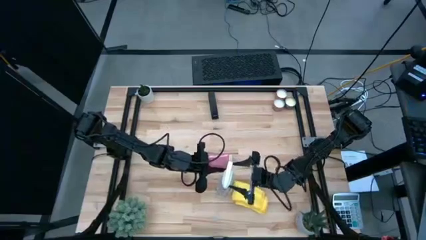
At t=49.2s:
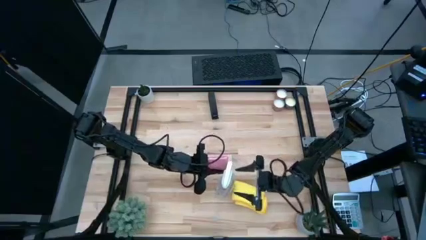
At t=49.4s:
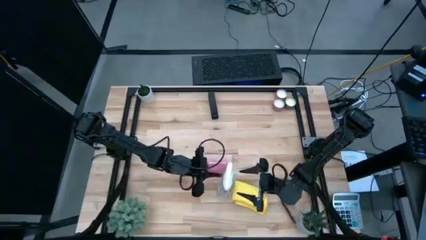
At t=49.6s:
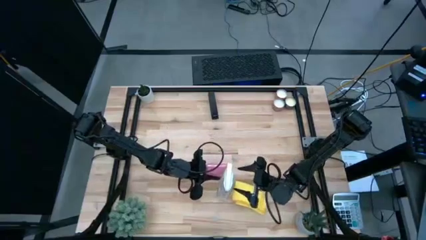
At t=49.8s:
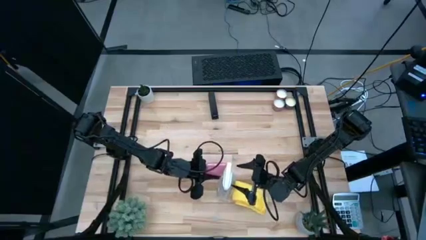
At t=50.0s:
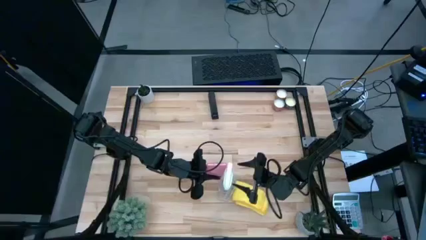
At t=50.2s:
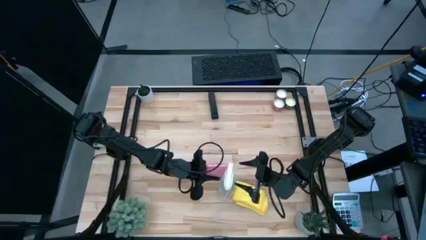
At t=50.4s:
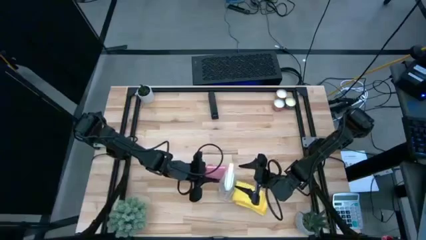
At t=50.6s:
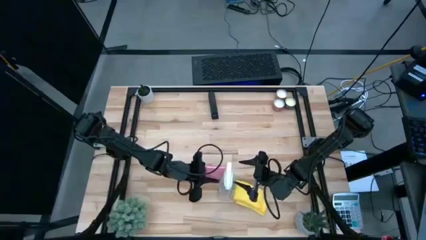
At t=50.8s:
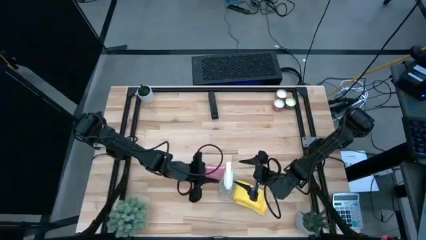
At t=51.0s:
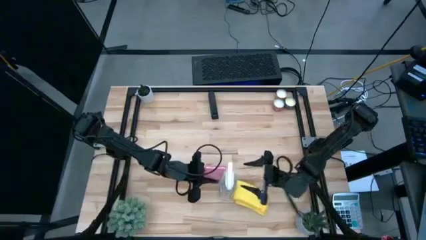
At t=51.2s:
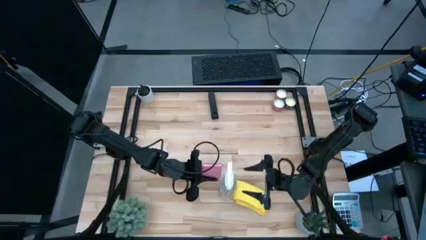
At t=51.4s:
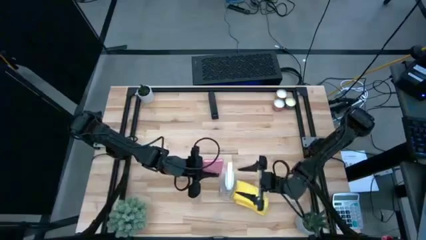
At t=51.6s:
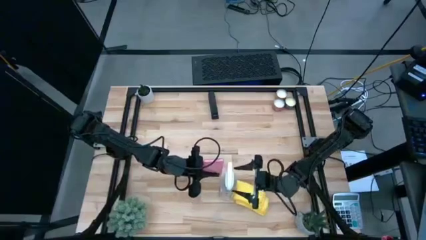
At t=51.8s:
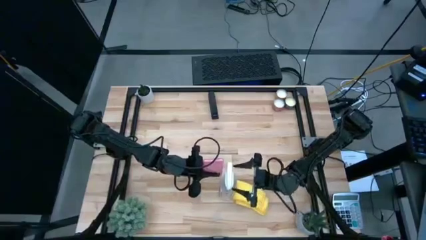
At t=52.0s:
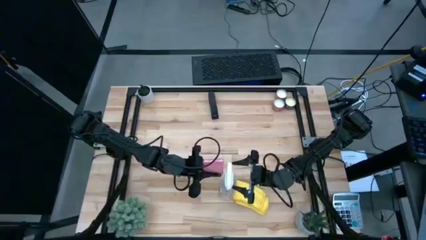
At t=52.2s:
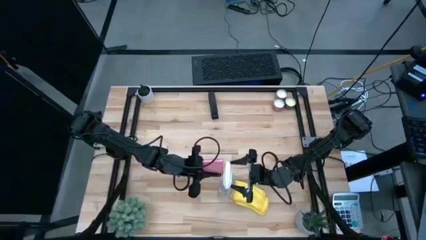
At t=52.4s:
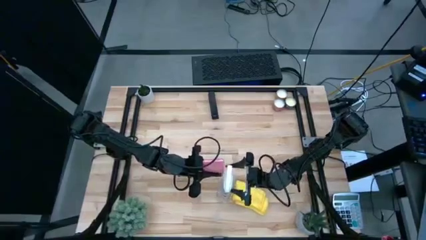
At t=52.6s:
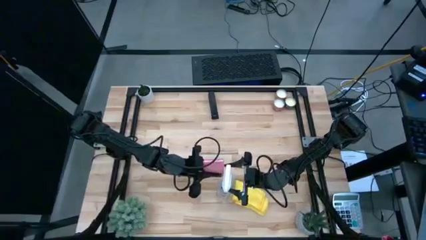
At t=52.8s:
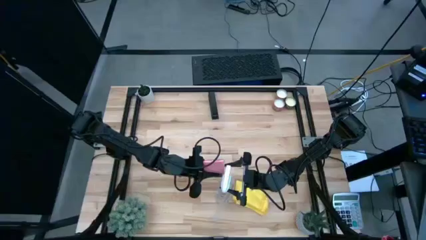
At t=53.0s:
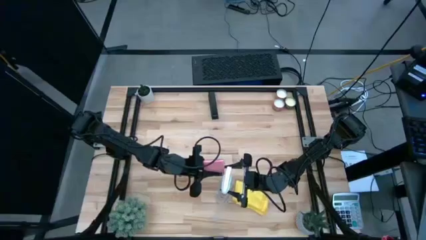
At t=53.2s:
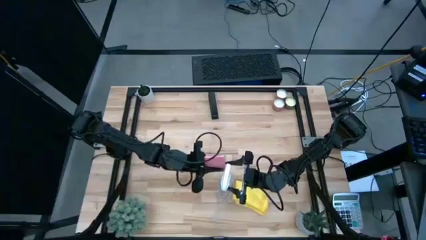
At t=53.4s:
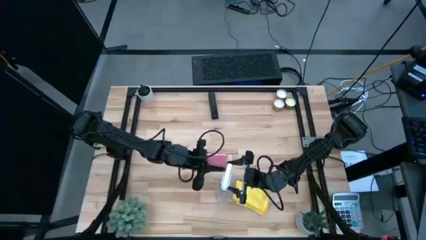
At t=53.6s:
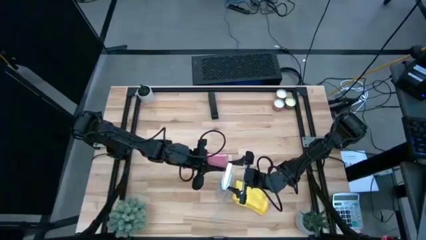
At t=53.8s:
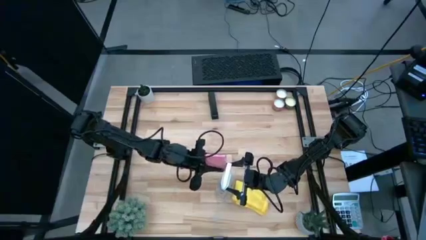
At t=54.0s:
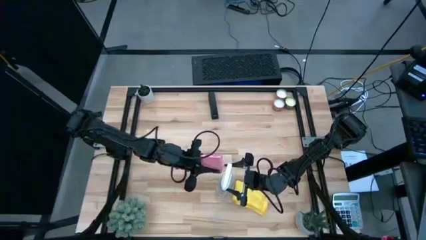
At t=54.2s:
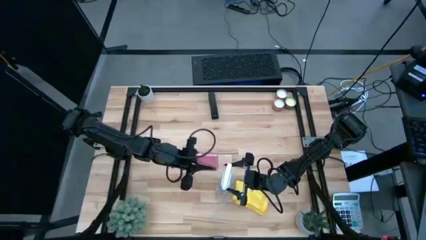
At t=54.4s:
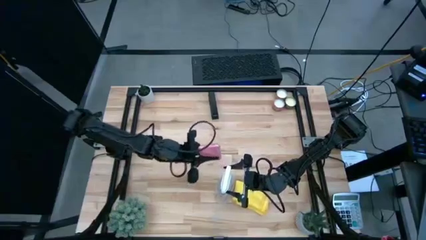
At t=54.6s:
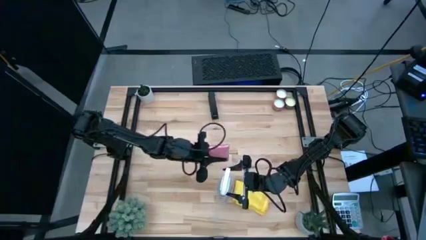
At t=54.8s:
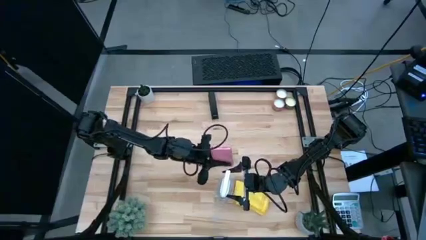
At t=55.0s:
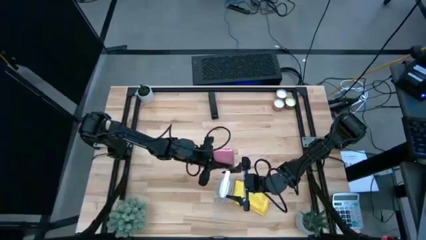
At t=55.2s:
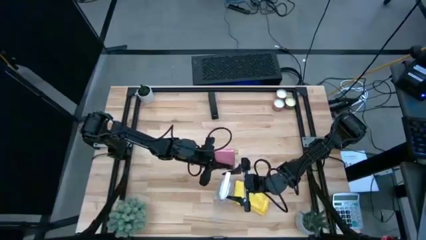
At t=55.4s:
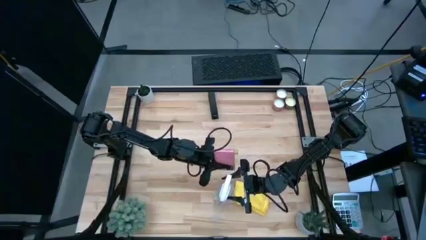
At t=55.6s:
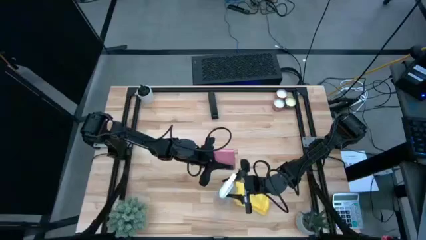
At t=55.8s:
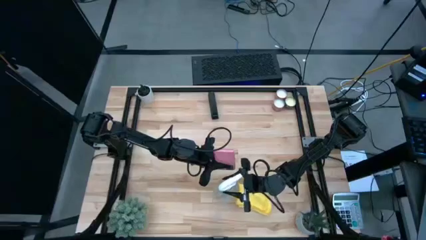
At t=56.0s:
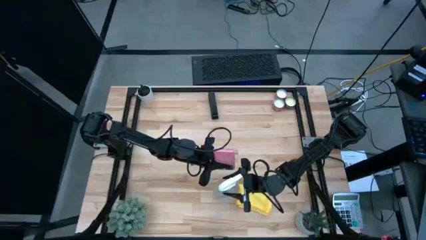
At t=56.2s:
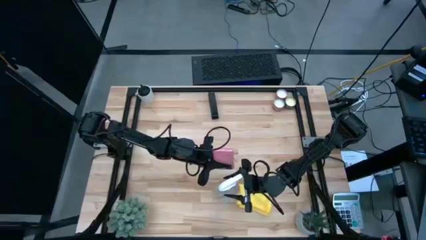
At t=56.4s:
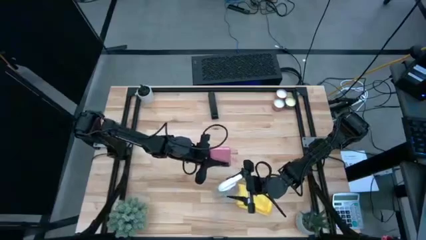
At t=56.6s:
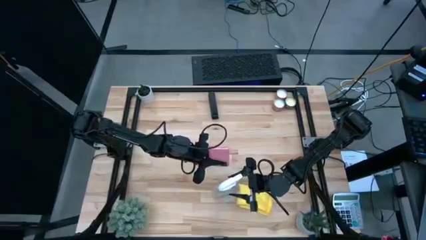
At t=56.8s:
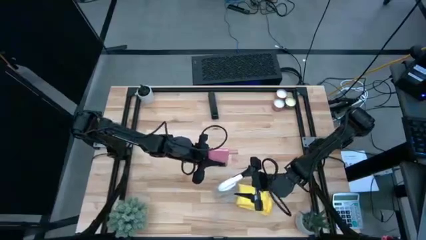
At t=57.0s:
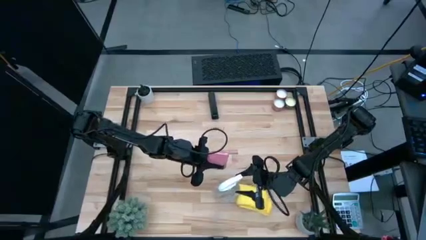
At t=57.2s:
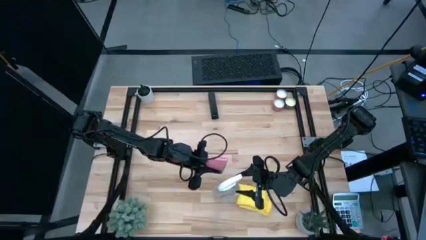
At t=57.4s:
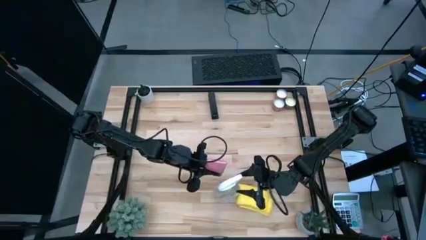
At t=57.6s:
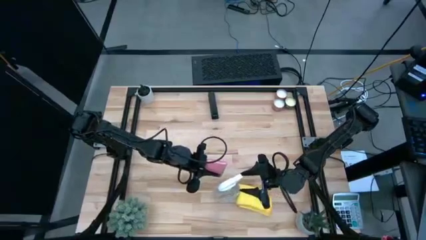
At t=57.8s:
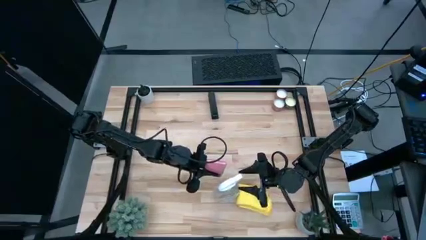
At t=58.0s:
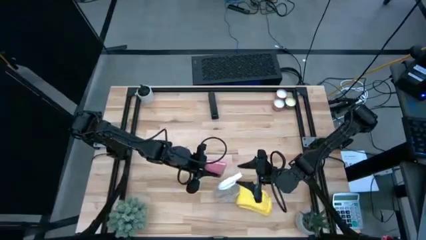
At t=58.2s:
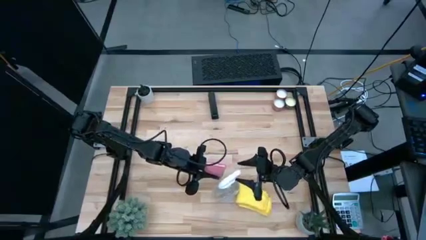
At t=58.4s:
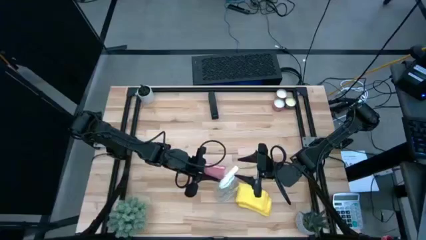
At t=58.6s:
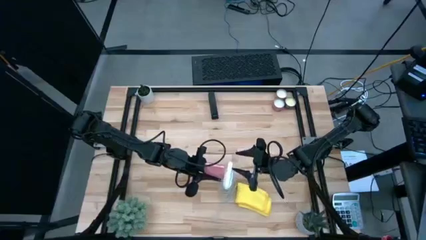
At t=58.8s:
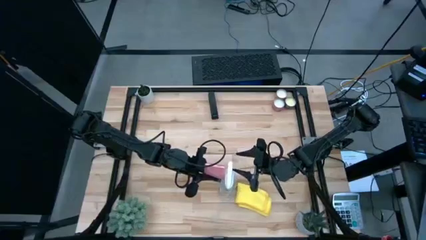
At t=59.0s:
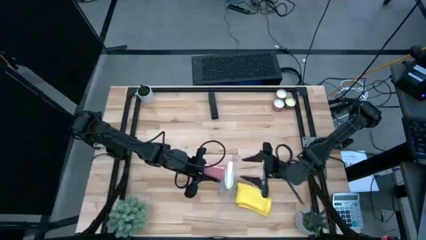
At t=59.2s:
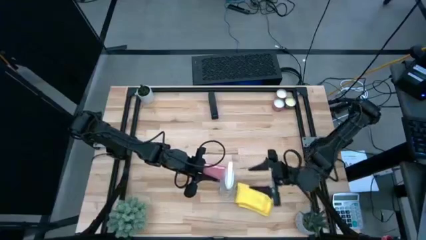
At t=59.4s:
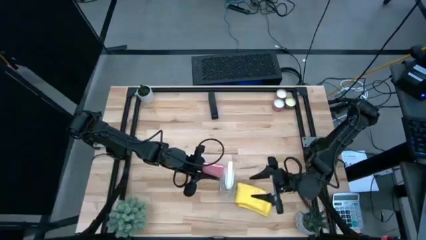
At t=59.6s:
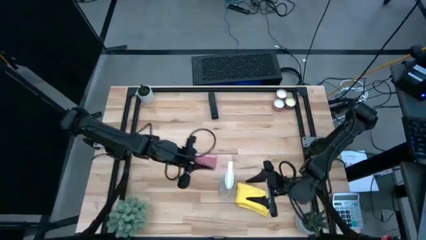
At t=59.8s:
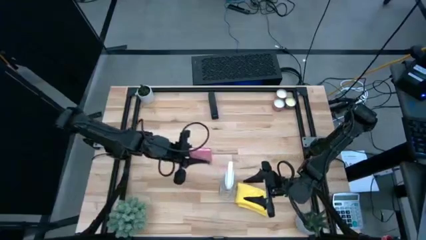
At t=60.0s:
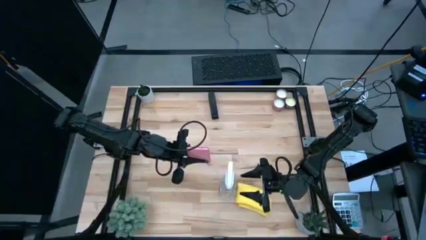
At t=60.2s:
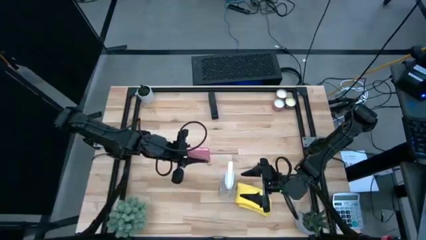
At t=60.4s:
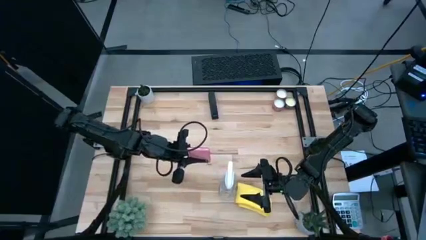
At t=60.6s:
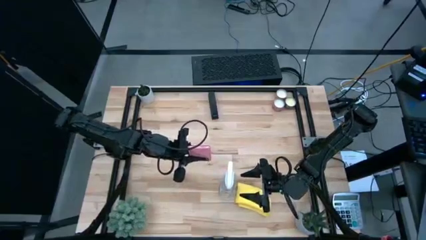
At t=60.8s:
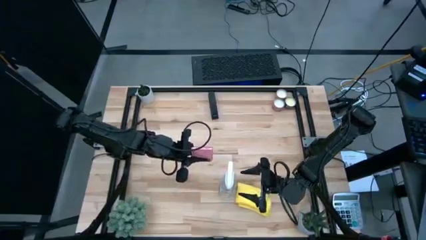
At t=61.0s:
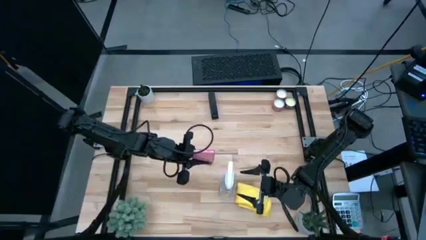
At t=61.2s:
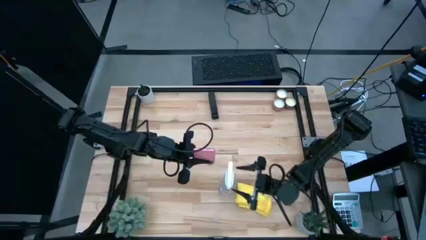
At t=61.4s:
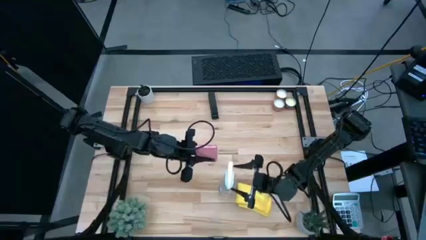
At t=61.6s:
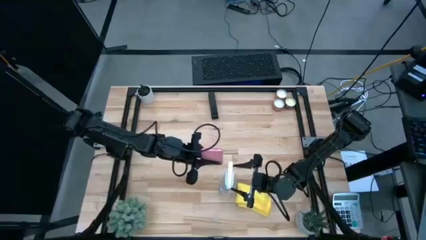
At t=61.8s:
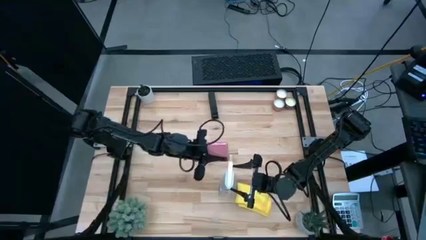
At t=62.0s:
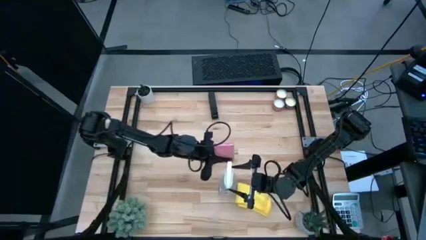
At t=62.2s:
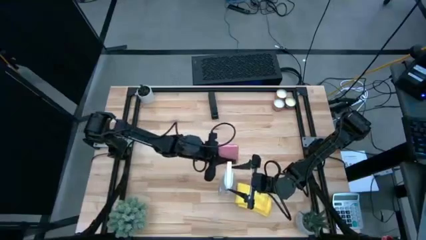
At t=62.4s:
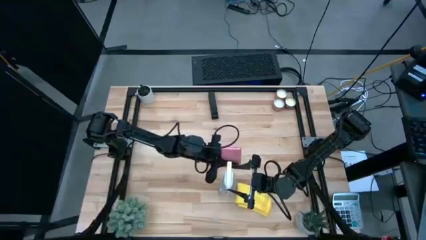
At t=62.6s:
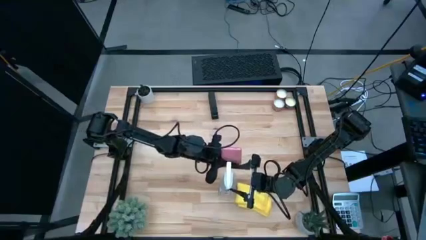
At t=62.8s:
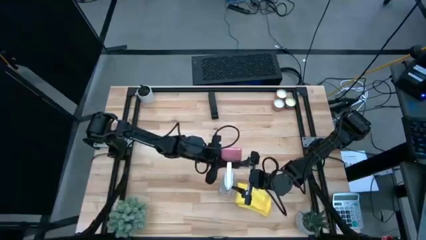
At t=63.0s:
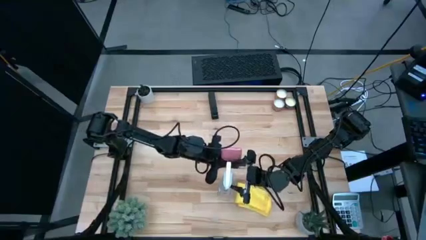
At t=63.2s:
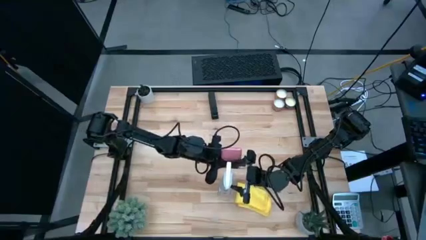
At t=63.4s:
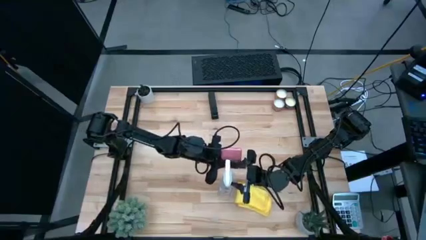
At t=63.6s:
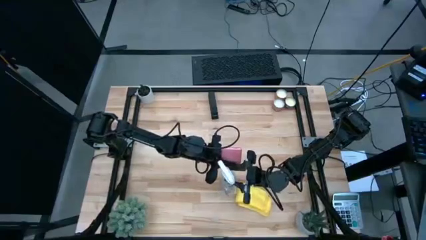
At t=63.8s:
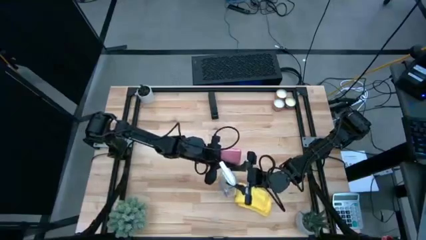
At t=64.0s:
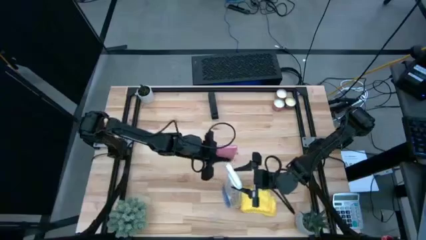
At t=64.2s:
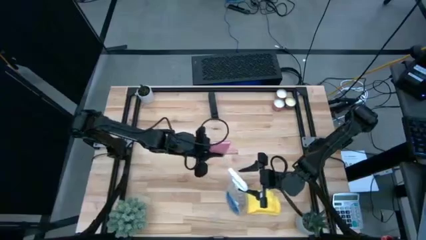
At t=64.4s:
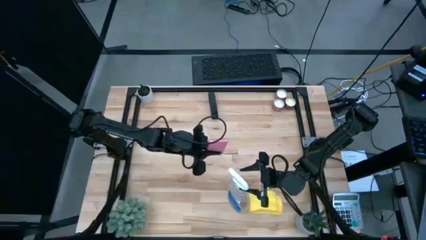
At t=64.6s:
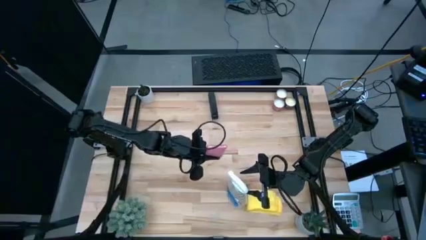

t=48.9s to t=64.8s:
Task: Apply microfiber cloth
Spray the back of the pink cellphone using the white spray bottle
